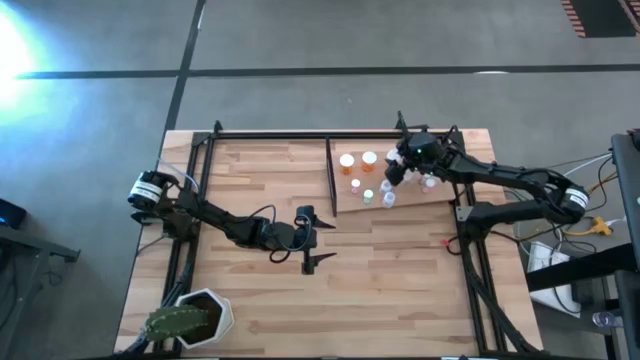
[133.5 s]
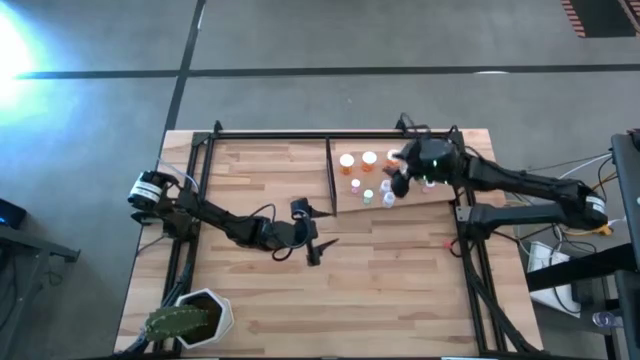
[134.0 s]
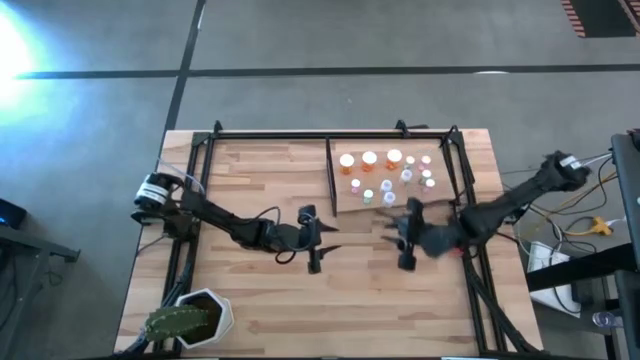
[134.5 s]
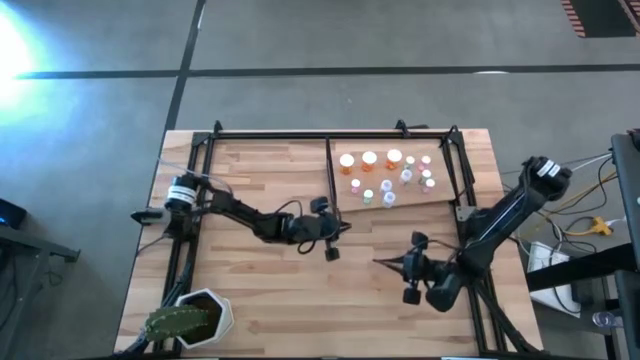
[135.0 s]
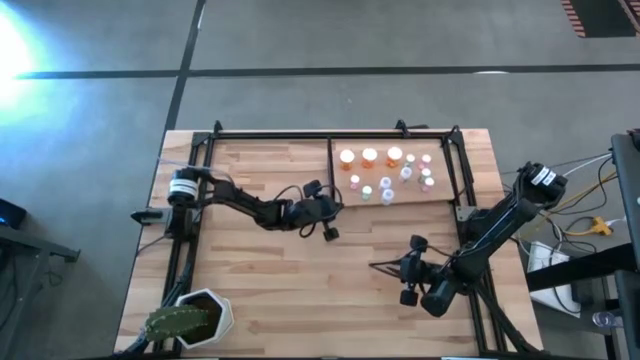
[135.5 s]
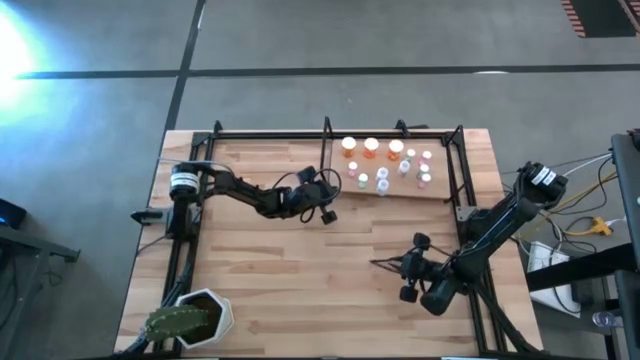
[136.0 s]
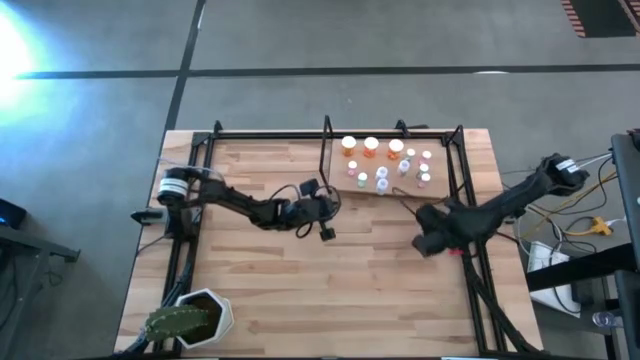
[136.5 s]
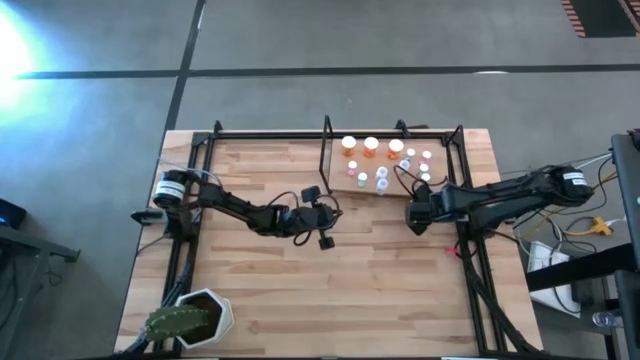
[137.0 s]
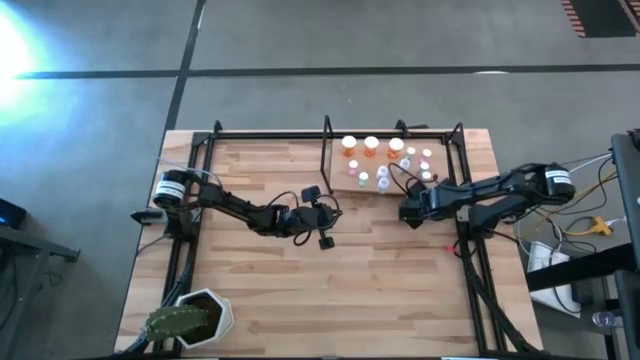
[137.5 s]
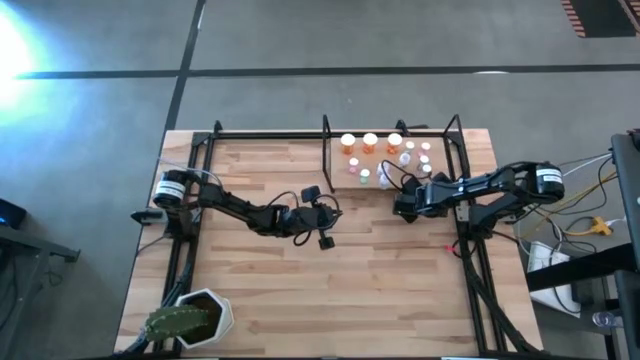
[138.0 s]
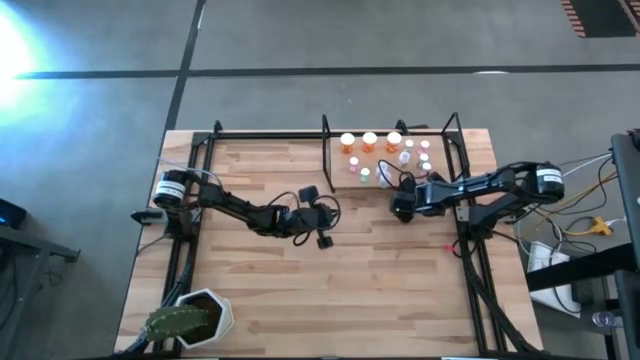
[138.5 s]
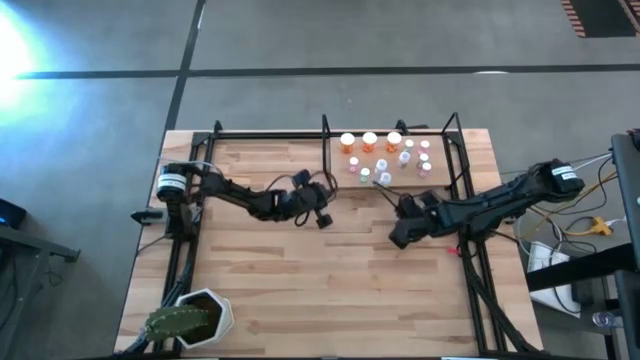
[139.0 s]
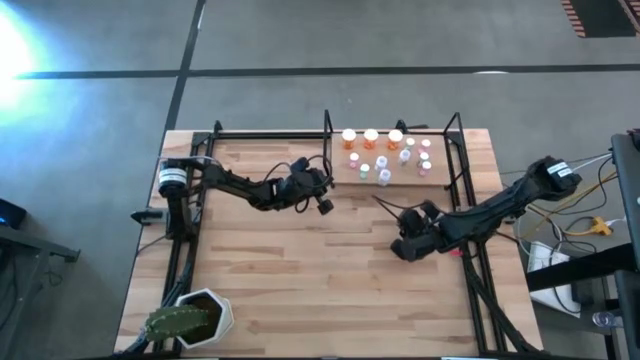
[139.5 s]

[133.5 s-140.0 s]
Task: Pick and place medicine bottles onto shelf by color
Adjust the shelf on the table

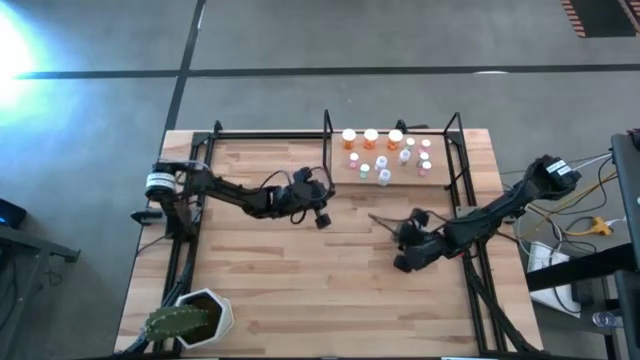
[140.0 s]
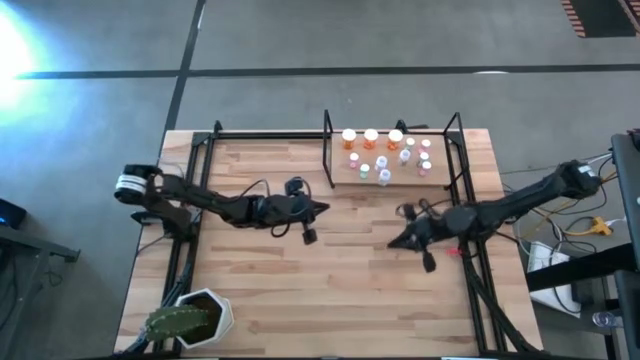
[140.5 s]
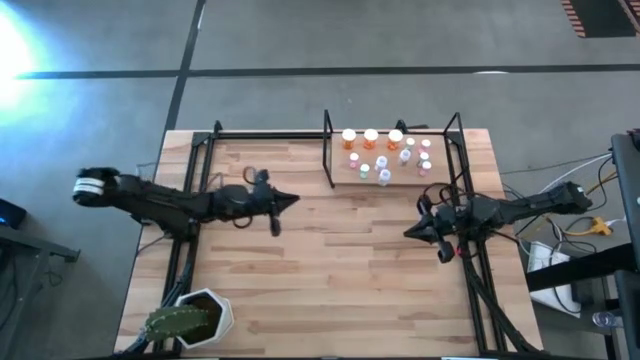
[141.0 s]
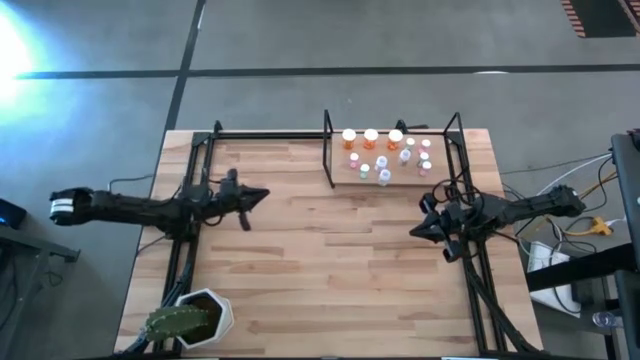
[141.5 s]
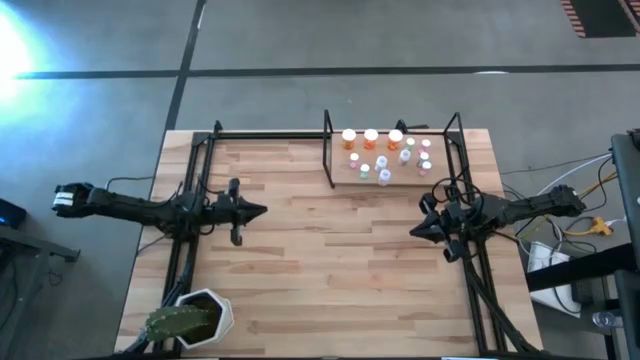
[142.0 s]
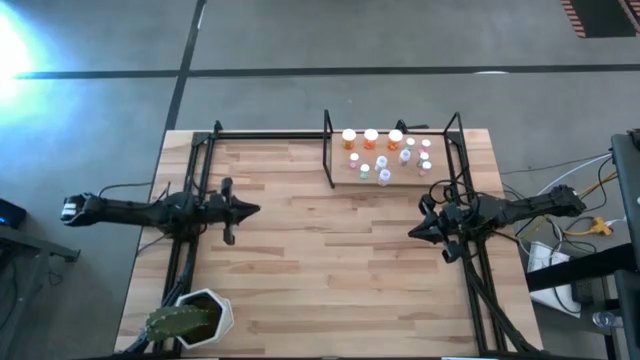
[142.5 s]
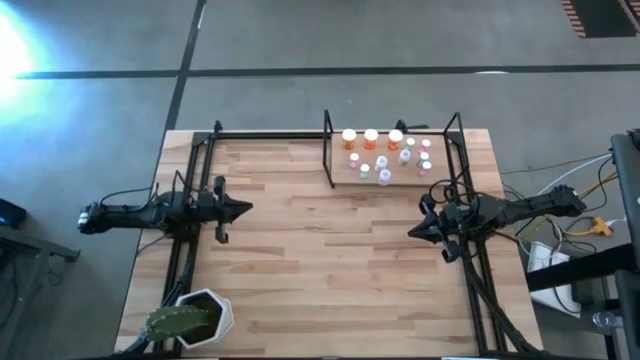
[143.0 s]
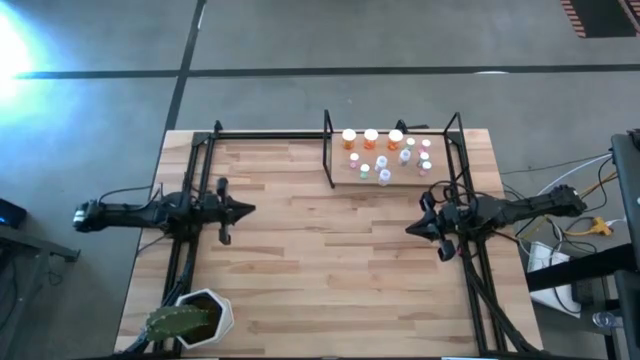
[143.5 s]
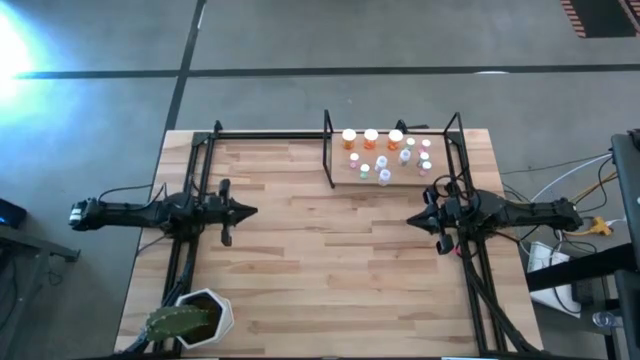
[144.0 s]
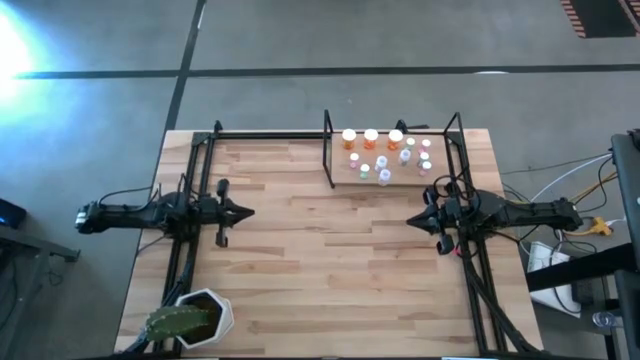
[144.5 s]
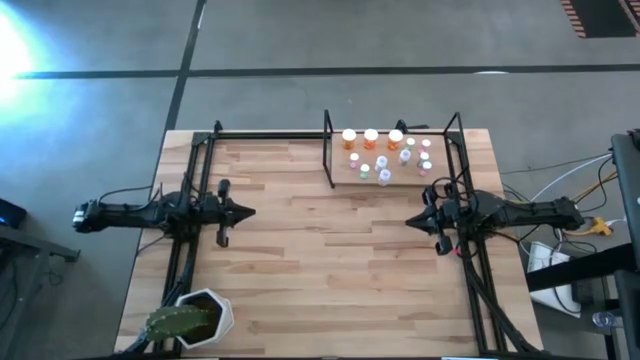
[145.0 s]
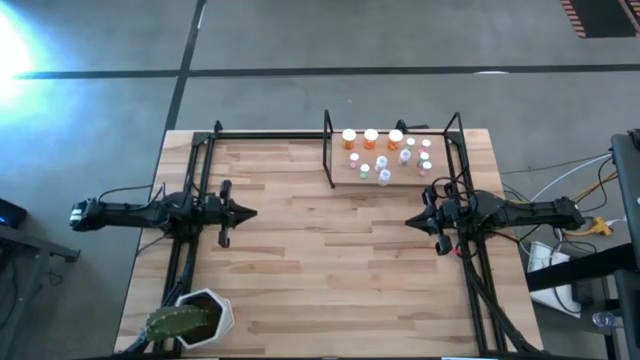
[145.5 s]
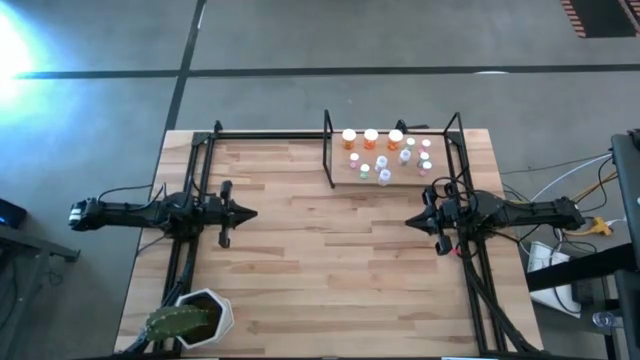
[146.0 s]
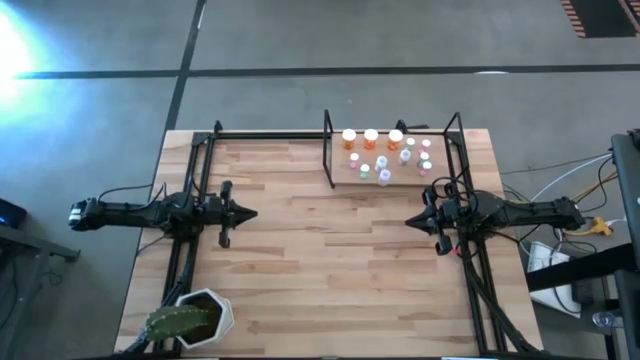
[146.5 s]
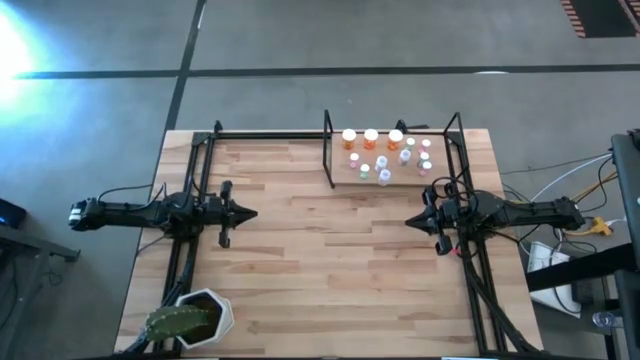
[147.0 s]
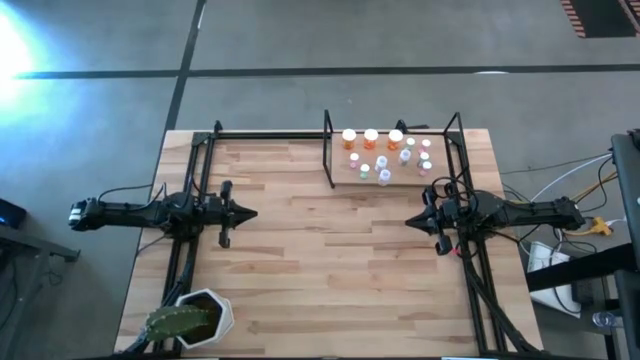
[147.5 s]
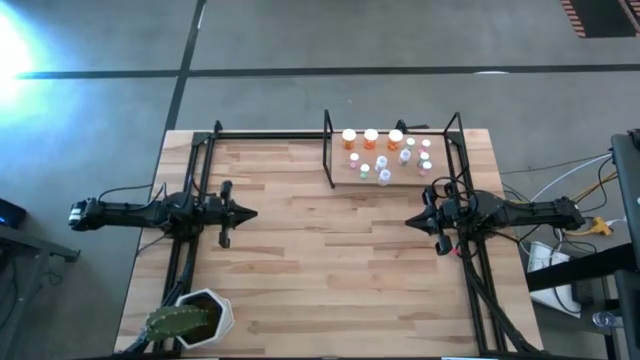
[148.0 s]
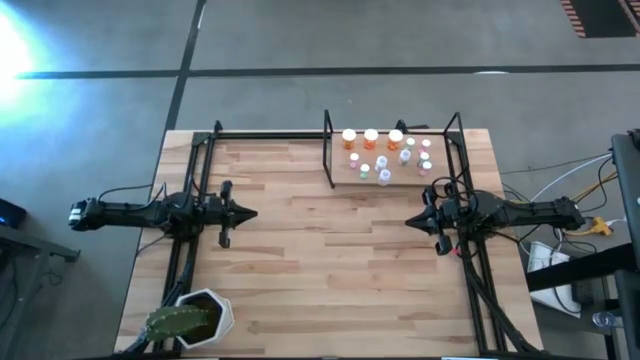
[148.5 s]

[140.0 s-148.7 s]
Return to Home Position

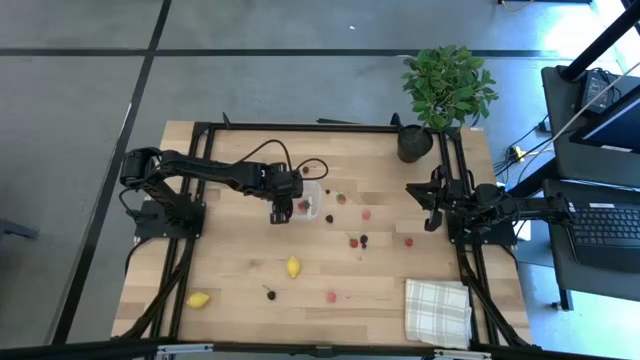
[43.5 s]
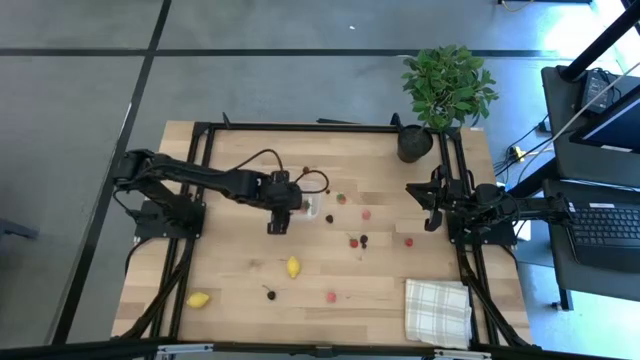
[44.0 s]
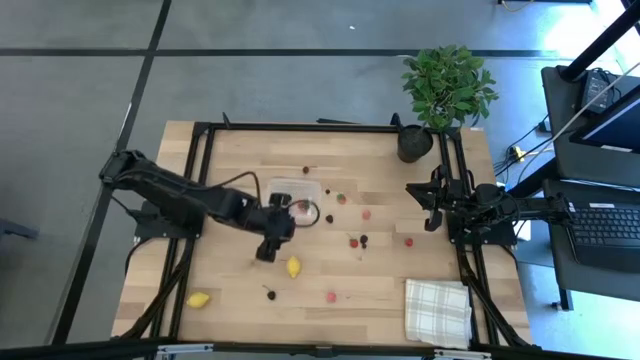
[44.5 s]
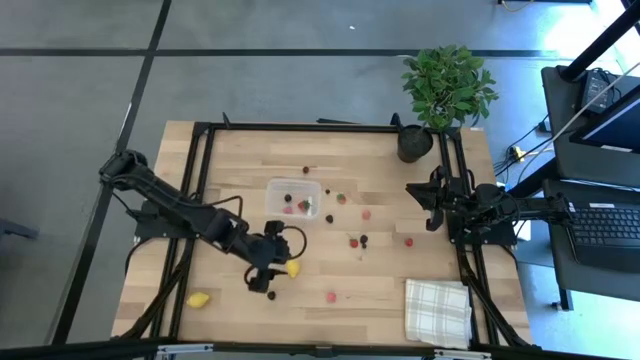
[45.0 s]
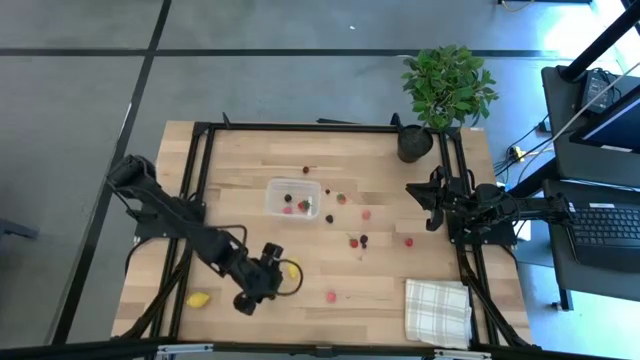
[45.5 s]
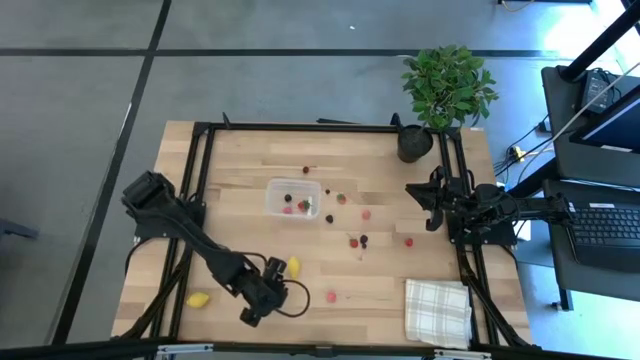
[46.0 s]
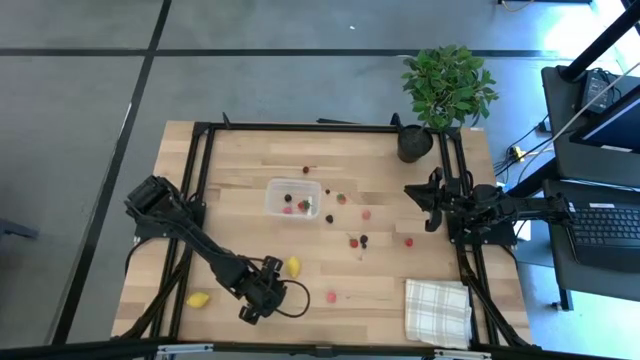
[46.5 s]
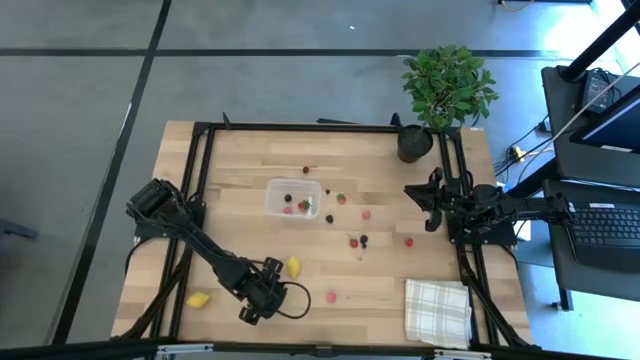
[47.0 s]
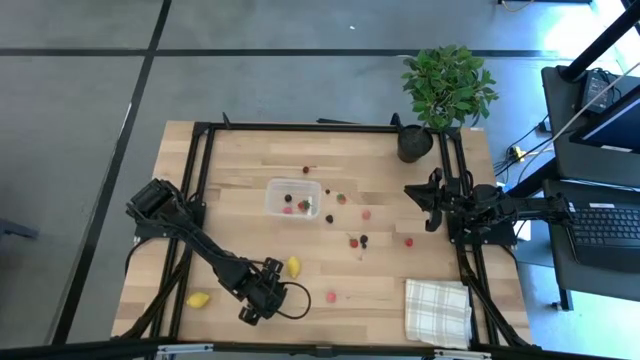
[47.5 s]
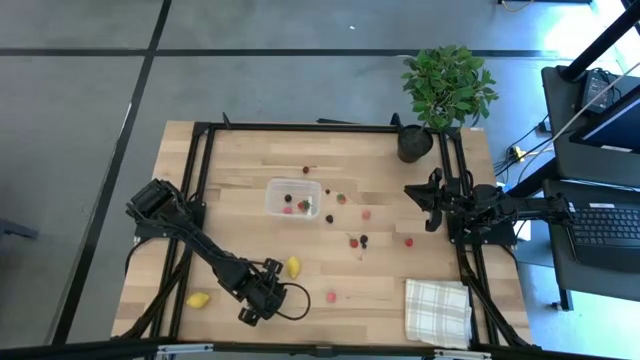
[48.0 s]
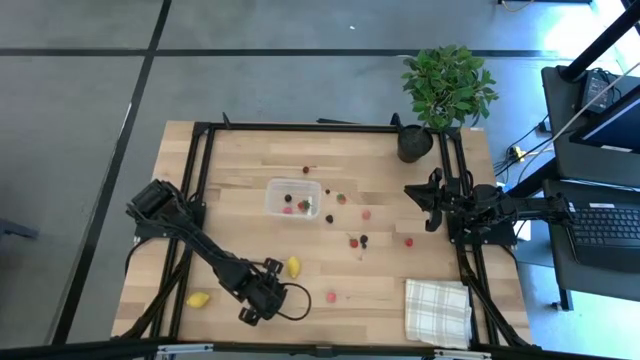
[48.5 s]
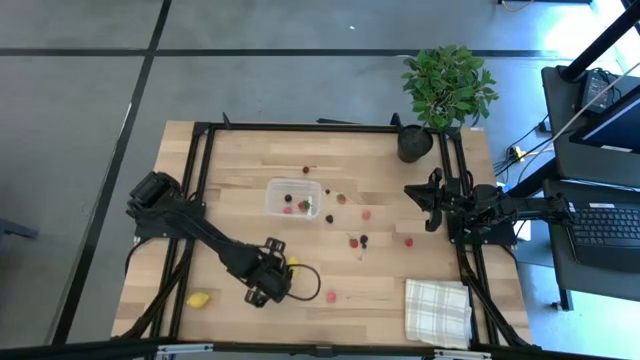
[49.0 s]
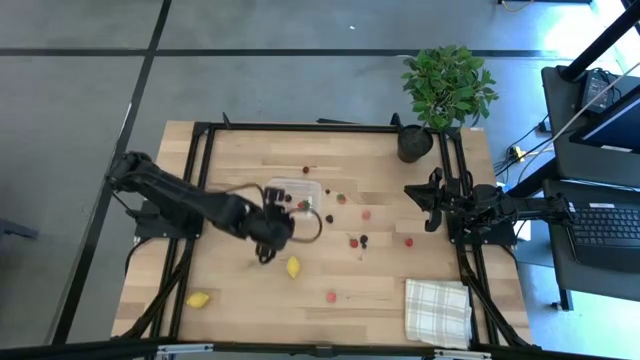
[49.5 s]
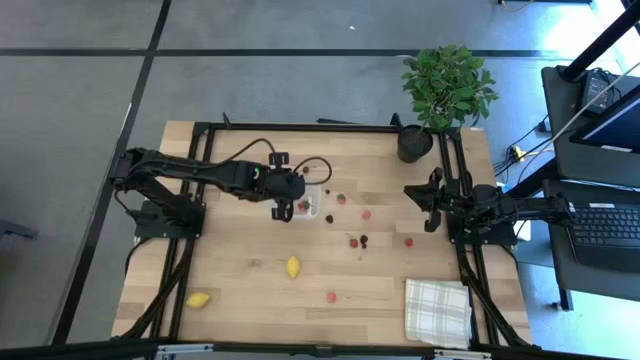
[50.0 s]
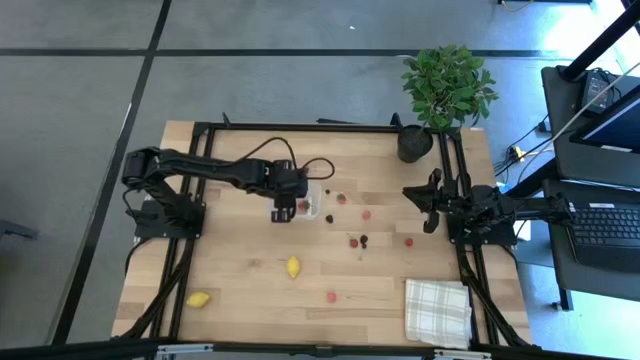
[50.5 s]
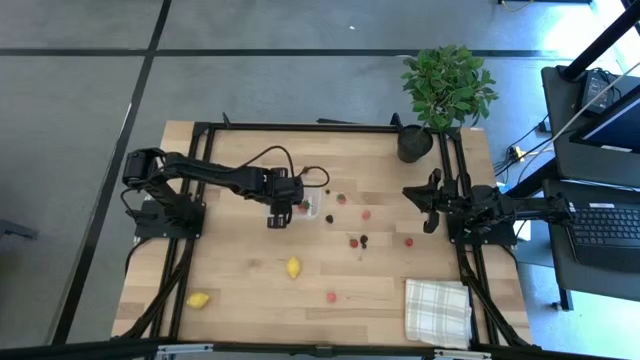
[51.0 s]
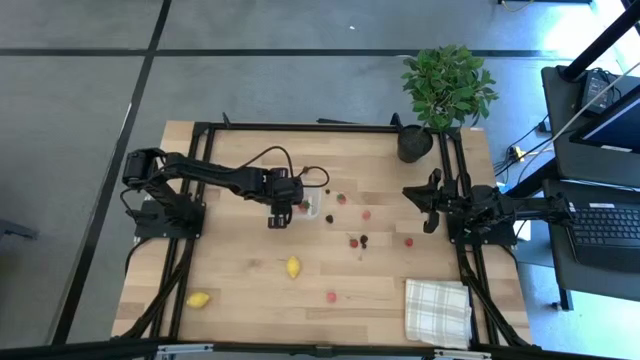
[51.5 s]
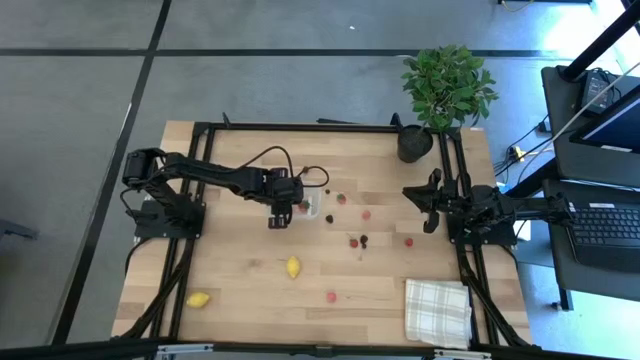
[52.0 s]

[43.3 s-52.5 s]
Task: Pick and placing Produce into tupperware
Put the black cherry into the transparent bin
